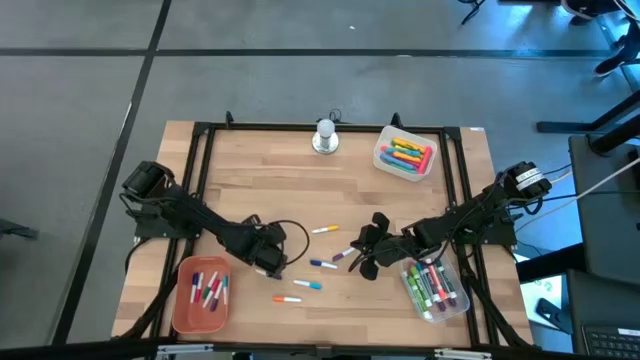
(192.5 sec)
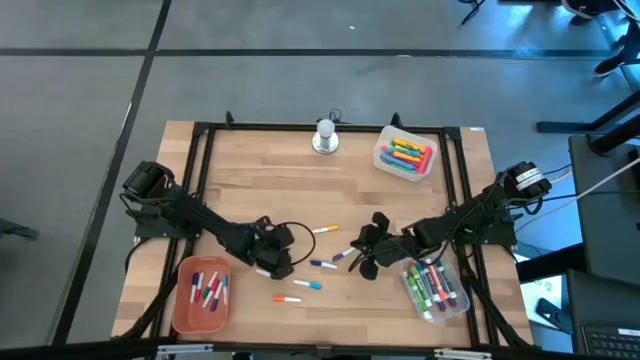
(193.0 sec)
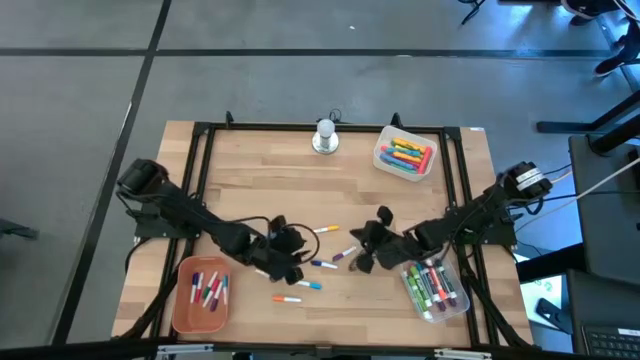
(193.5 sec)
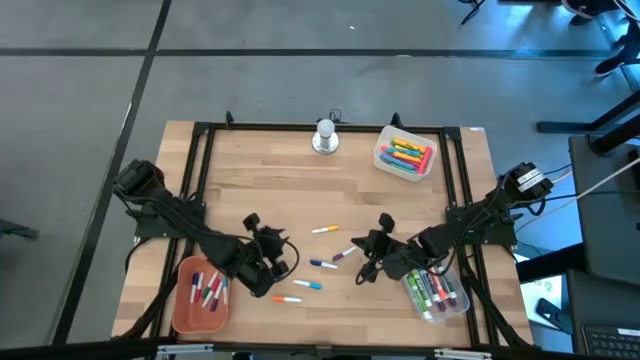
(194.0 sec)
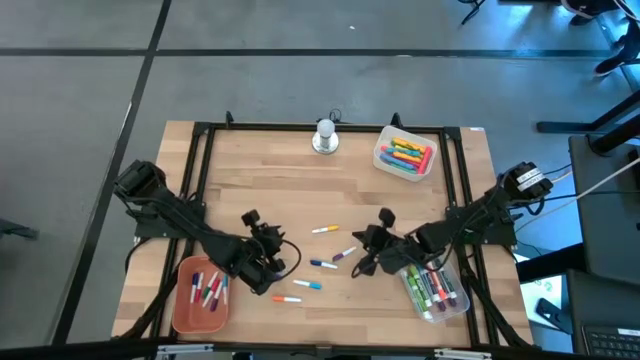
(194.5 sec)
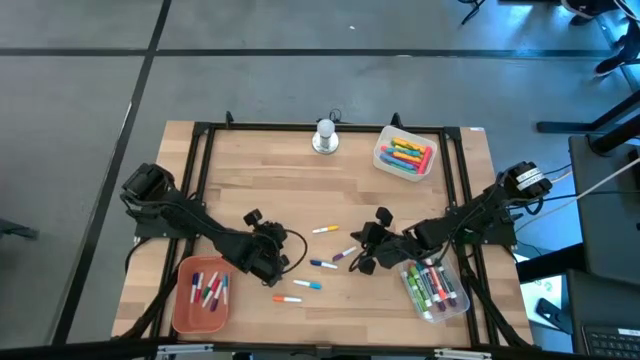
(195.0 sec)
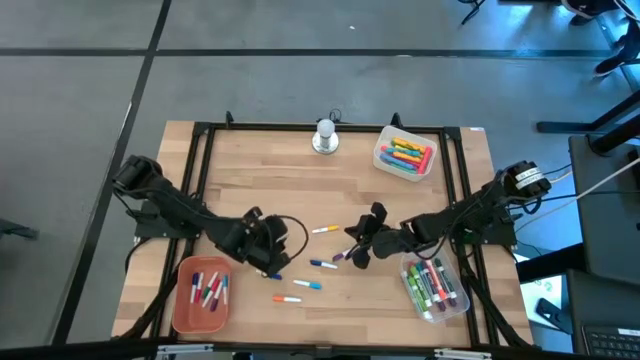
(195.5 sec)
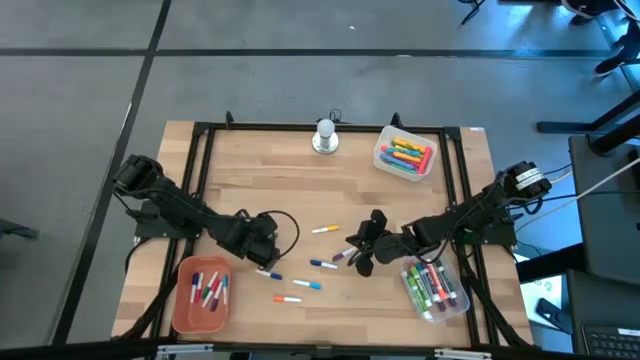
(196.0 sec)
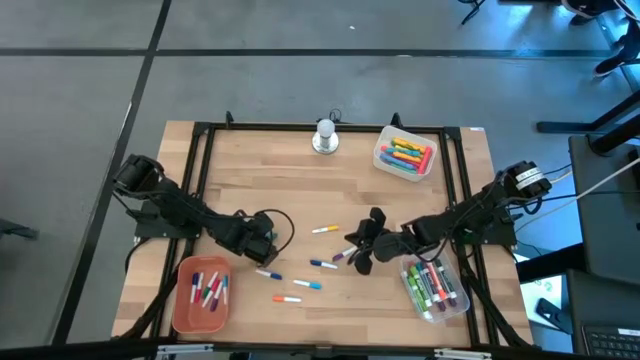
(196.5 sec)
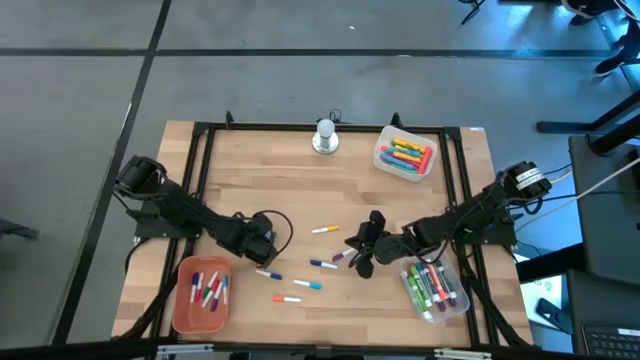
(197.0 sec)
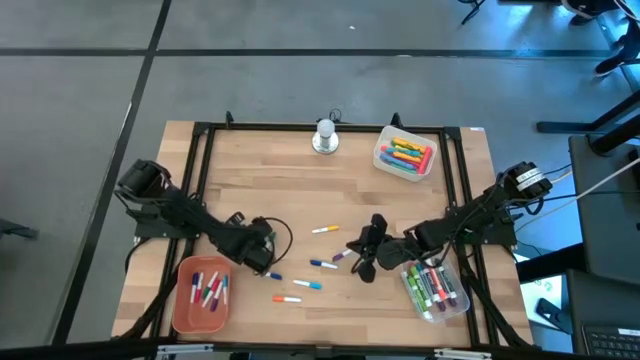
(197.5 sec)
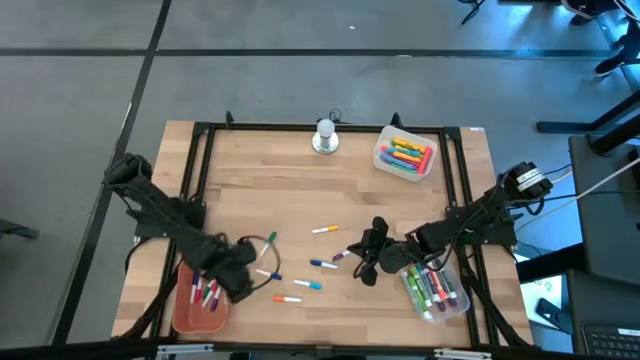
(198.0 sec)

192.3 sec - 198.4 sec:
Task: Pick & Place Markers
Put the small light blue highlighter pen into the orange bin

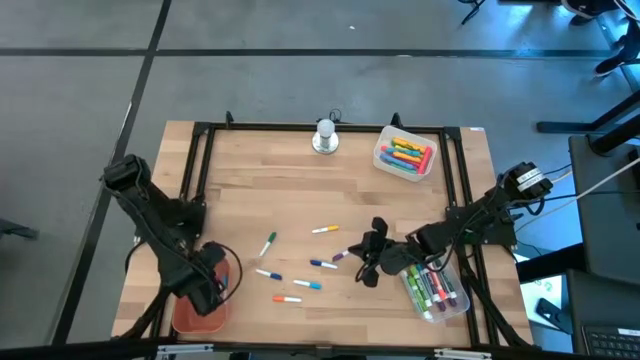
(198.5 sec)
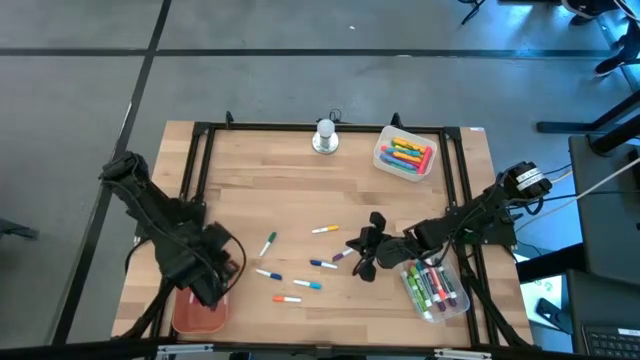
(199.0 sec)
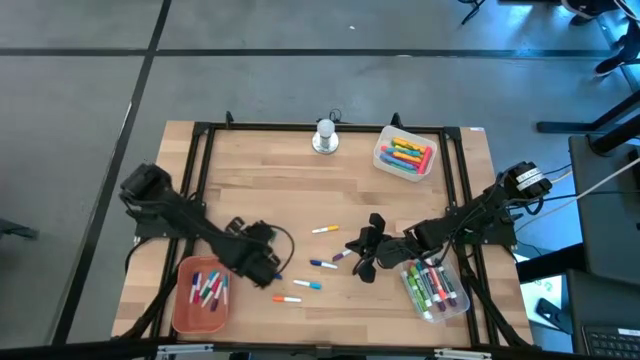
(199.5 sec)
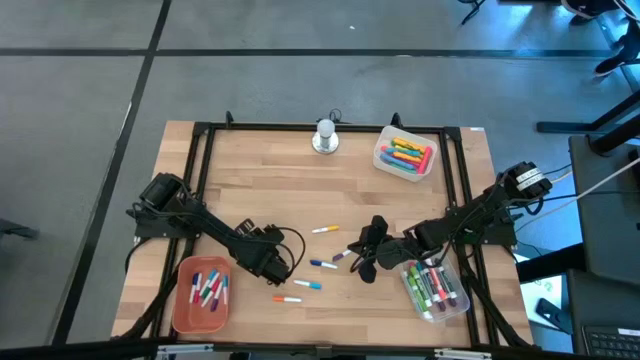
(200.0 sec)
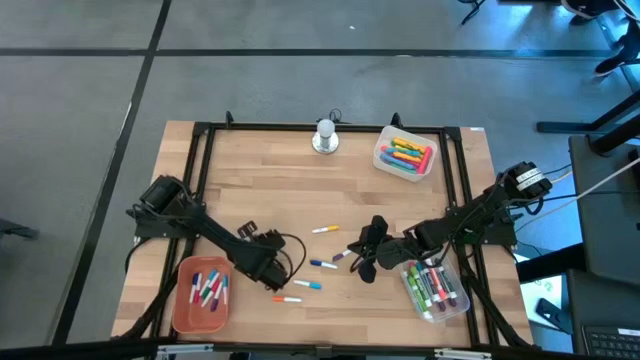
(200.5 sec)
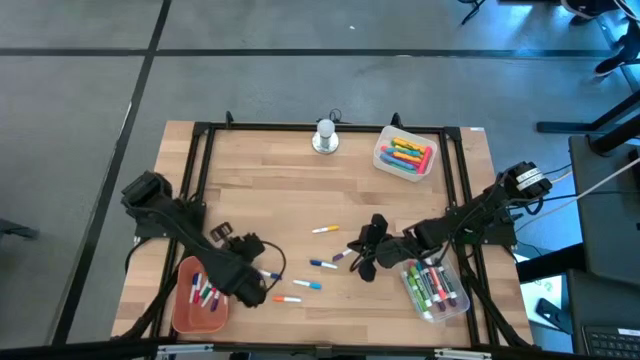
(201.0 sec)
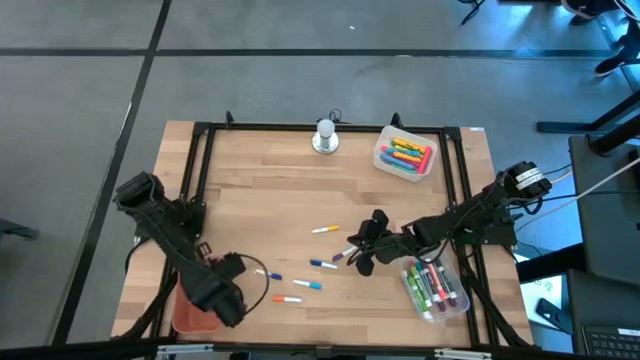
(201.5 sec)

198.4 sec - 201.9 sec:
Put the small green highlighter pen into the orange bin

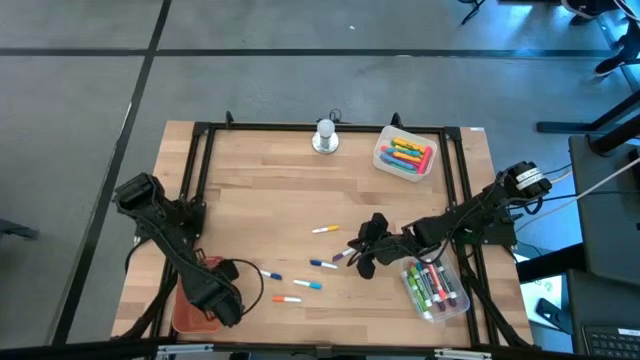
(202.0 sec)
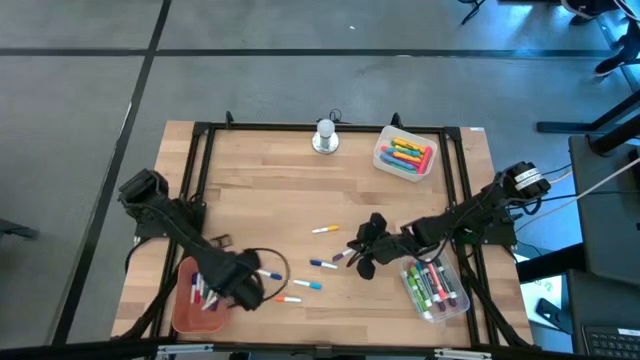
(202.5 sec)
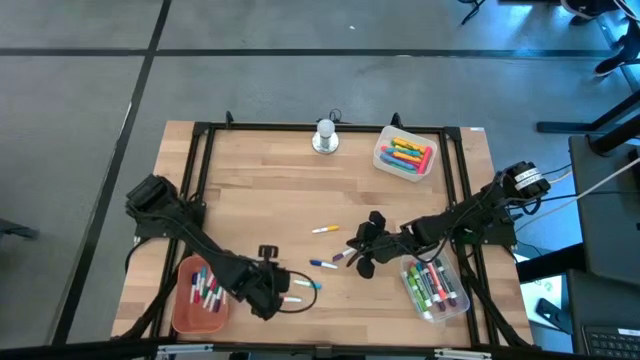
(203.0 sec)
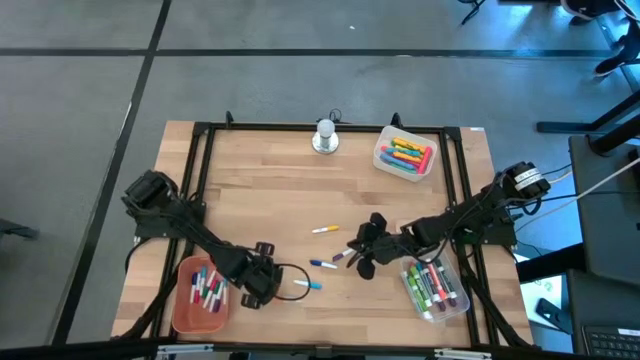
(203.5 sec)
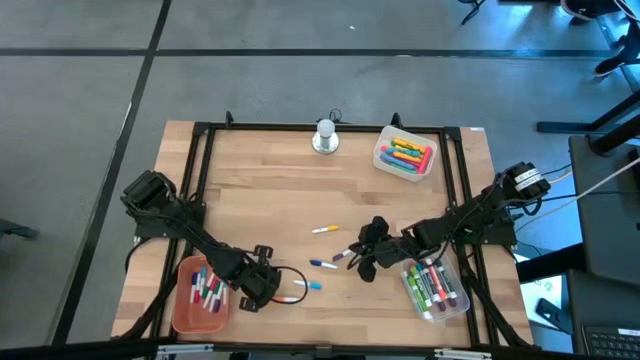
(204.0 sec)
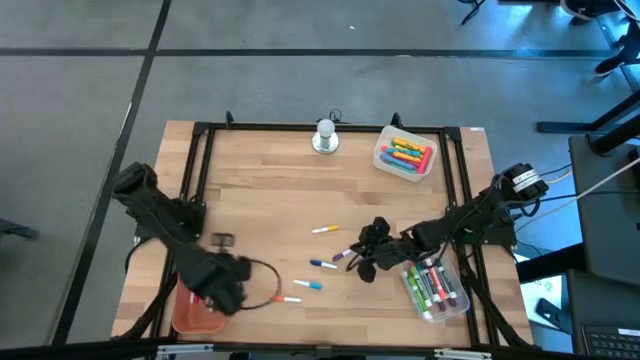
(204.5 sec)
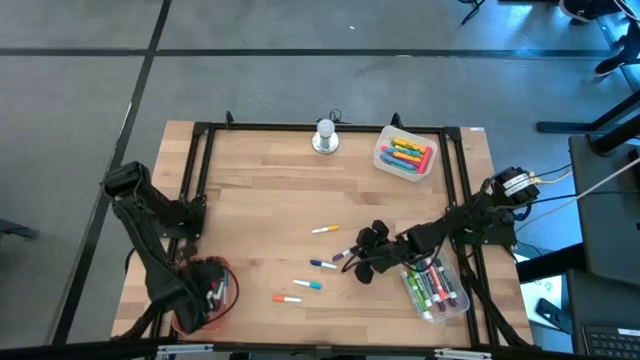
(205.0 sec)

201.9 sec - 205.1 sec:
Put the small blue highlighter pen into the orange bin

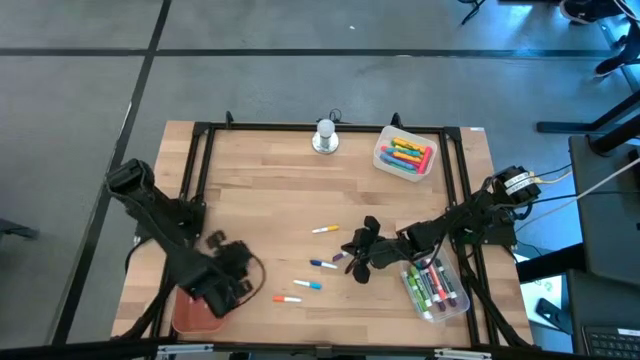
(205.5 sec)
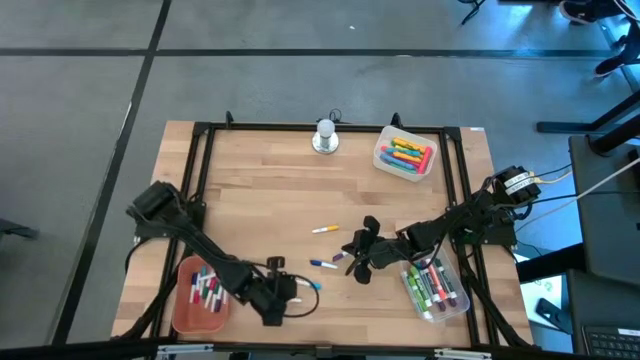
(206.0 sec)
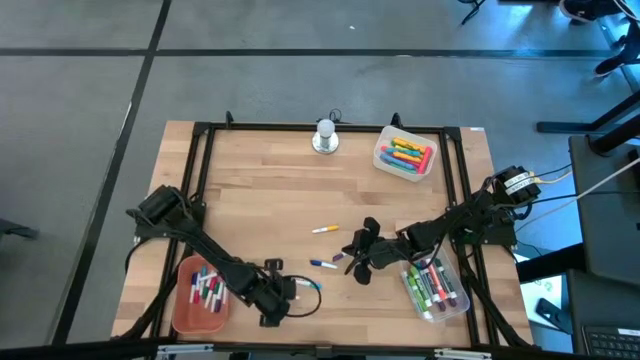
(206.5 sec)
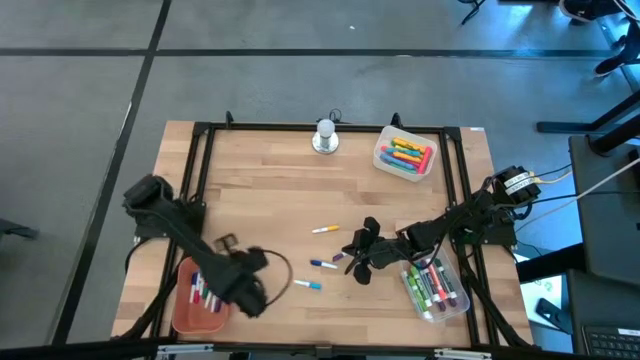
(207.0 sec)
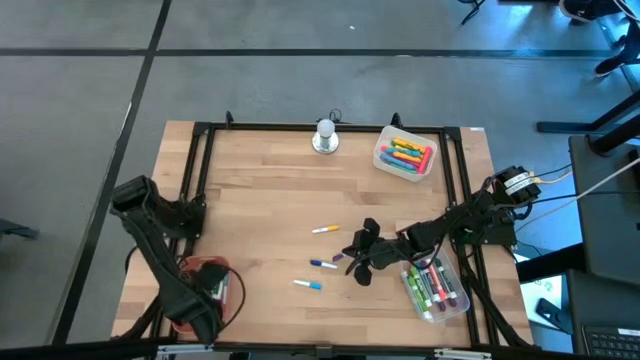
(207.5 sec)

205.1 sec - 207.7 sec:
Put the small orange highlighter pen into the orange bin

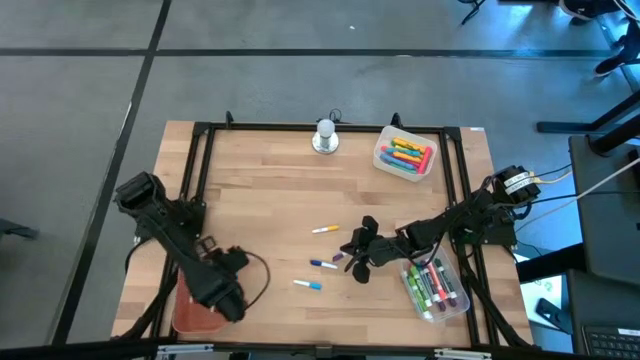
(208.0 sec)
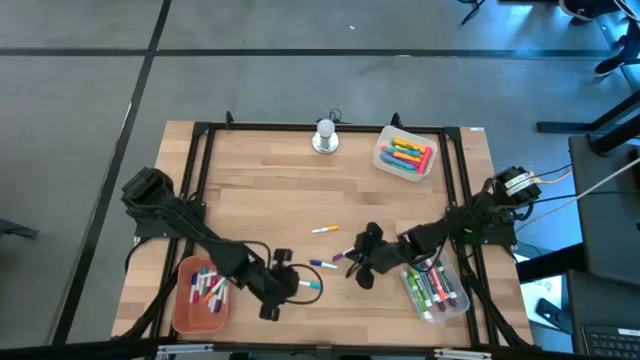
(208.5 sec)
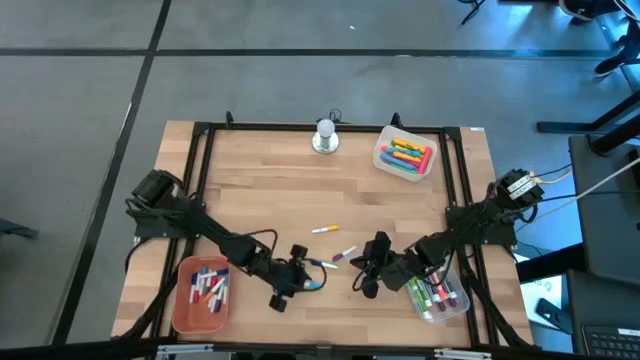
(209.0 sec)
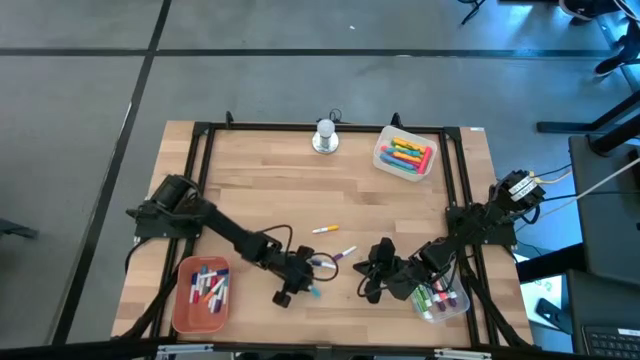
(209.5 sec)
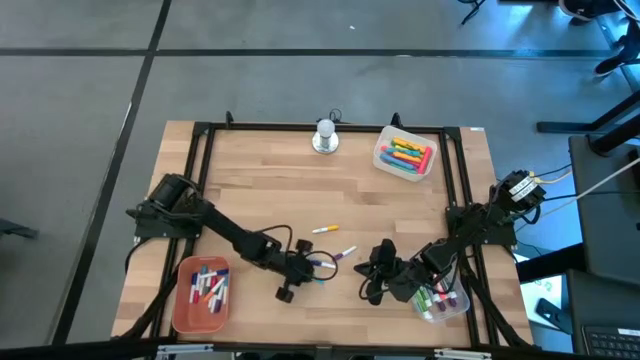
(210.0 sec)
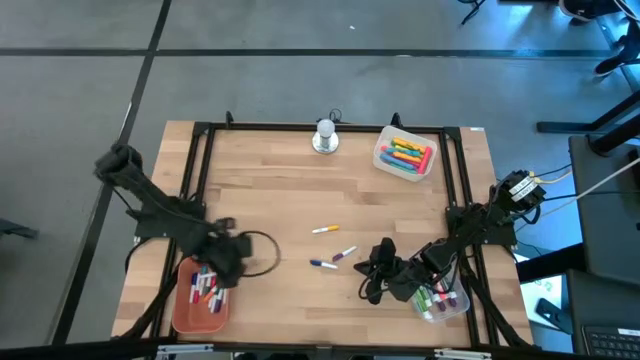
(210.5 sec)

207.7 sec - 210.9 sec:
Put the small light blue highlighter pen into the orange bin

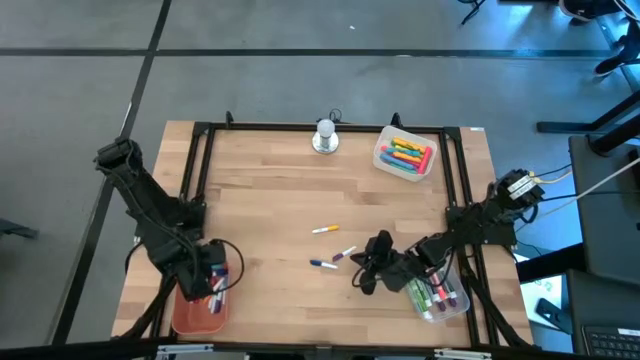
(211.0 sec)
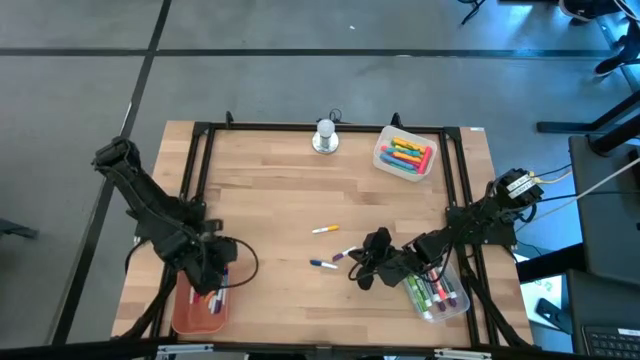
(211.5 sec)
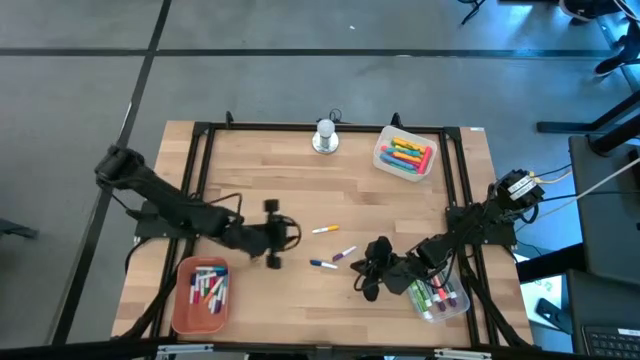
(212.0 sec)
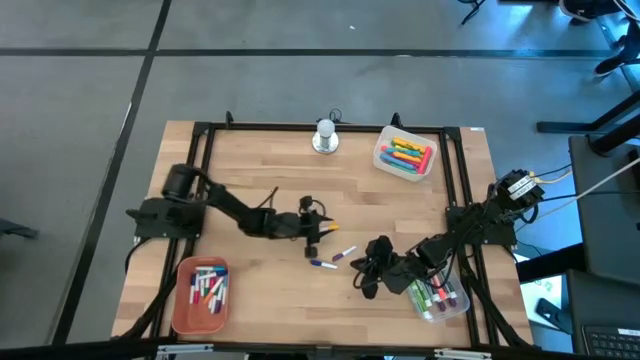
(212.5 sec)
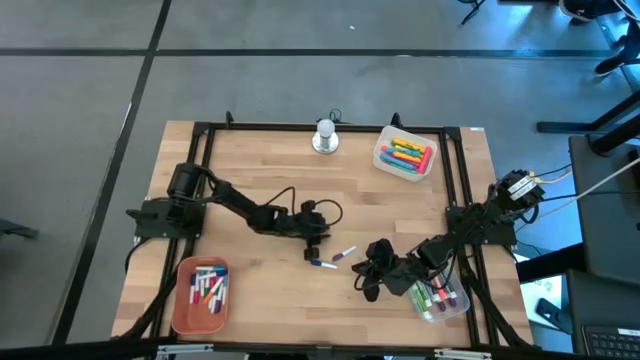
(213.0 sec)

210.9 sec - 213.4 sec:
Put the small yellow highlighter pen into the orange bin

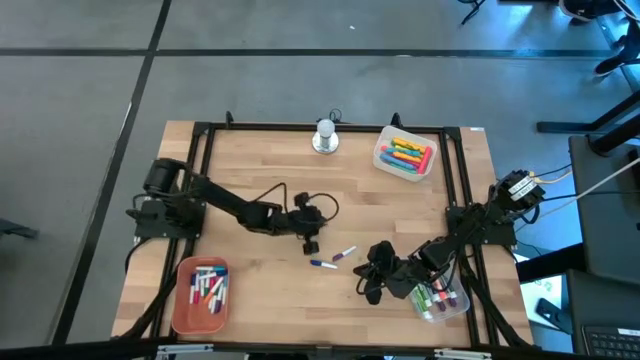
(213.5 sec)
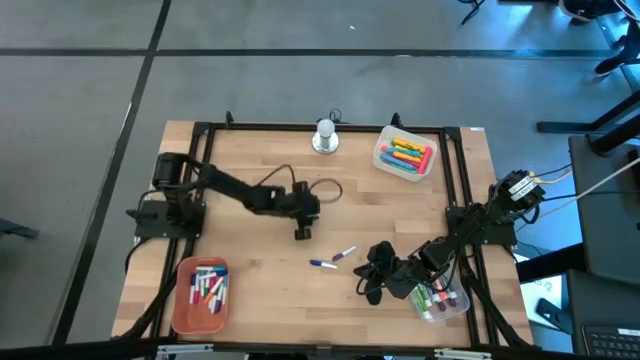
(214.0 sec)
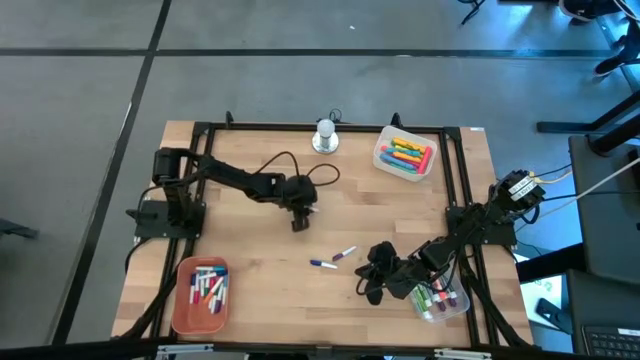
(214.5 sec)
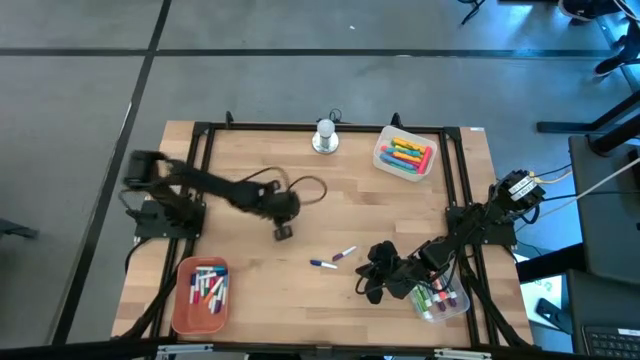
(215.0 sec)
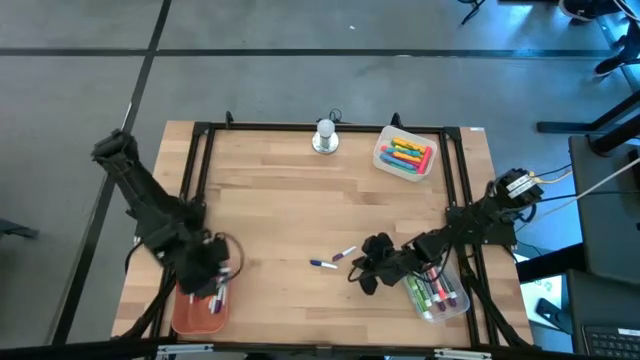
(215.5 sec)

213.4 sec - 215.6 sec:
Put the small yellow highlighter pen into the orange bin
